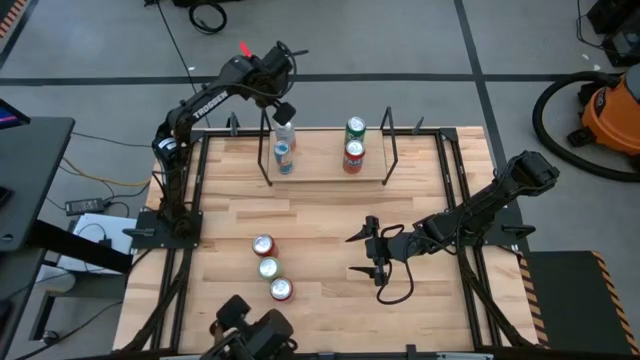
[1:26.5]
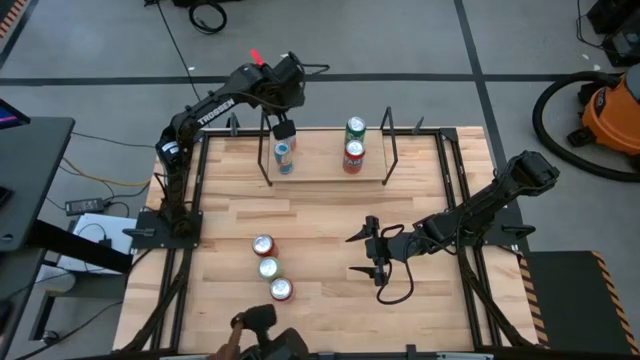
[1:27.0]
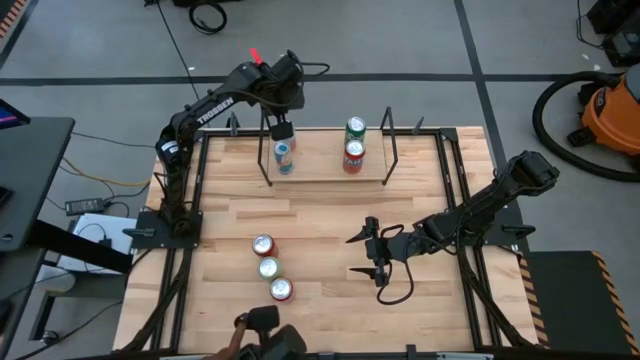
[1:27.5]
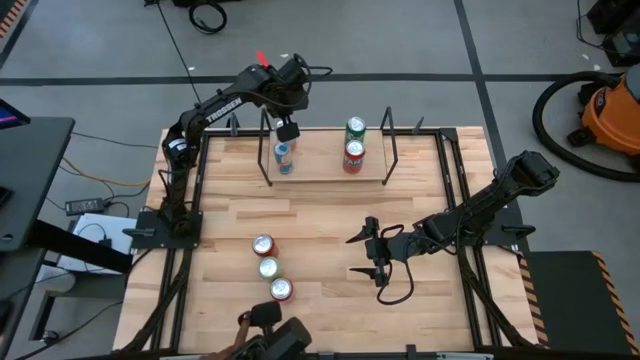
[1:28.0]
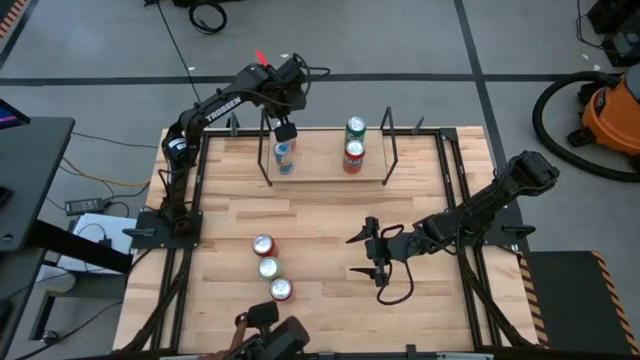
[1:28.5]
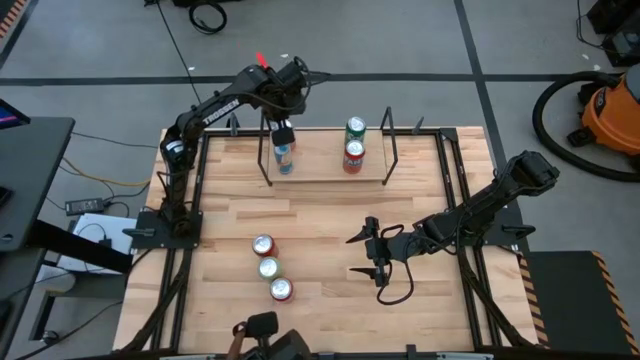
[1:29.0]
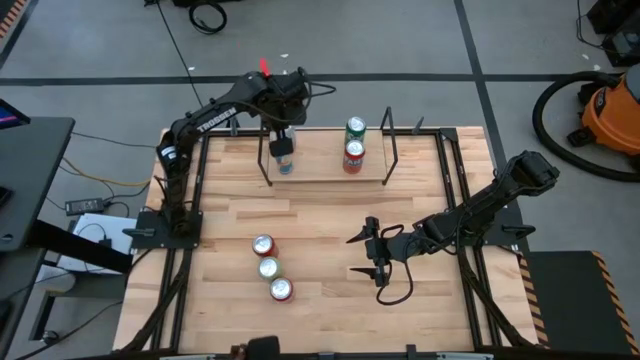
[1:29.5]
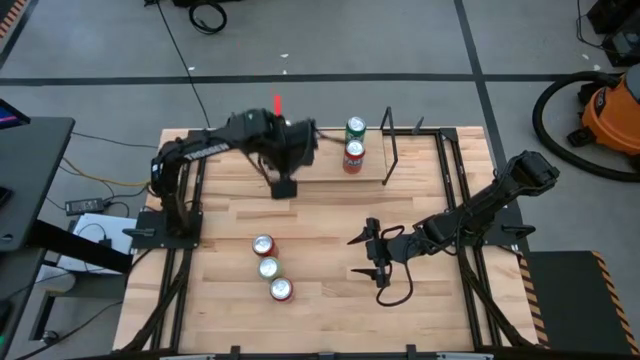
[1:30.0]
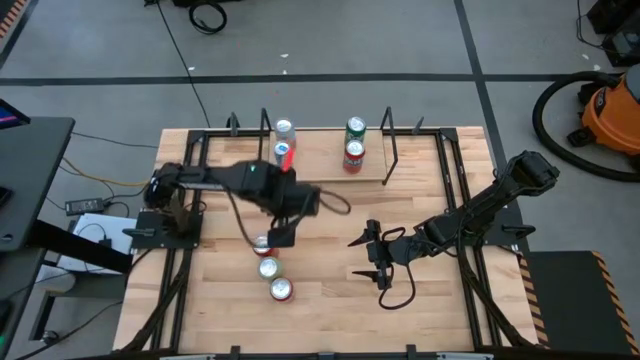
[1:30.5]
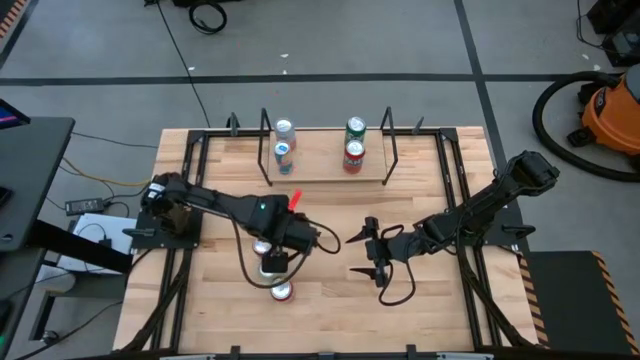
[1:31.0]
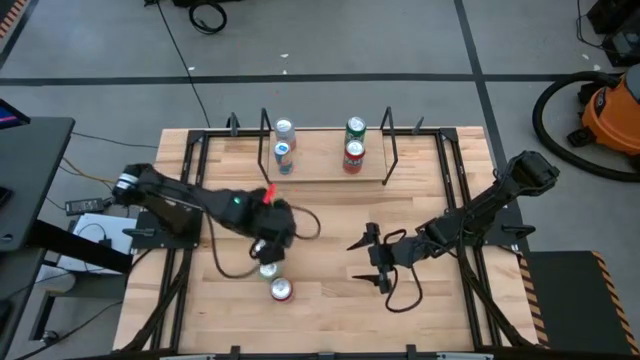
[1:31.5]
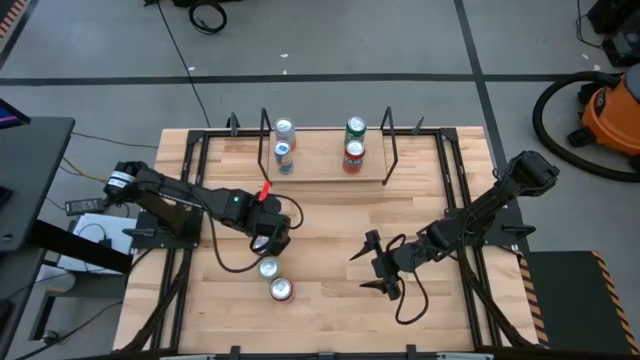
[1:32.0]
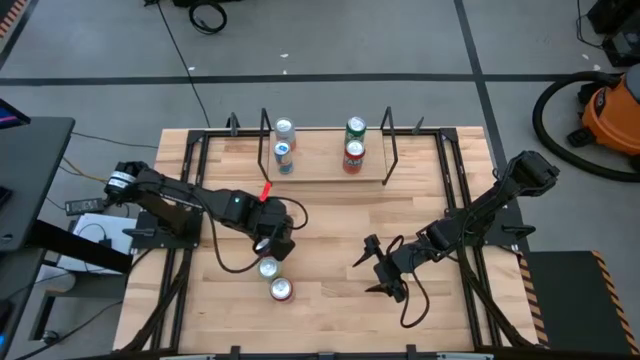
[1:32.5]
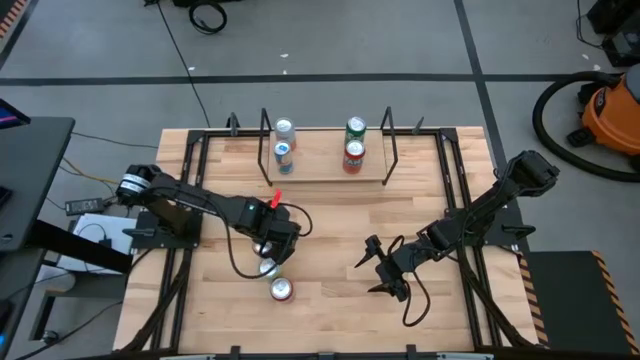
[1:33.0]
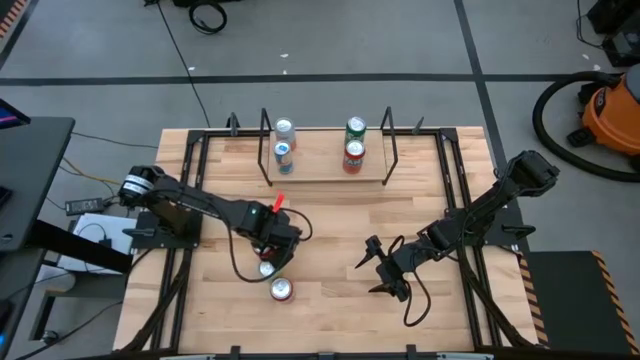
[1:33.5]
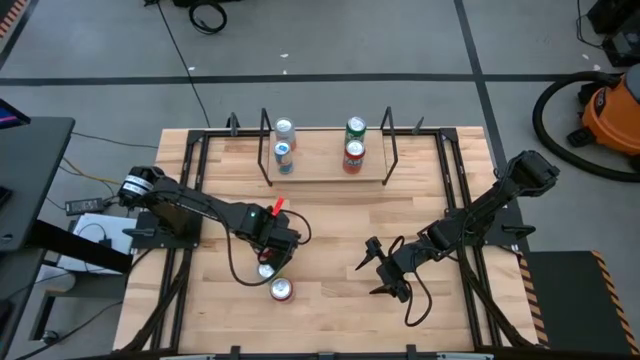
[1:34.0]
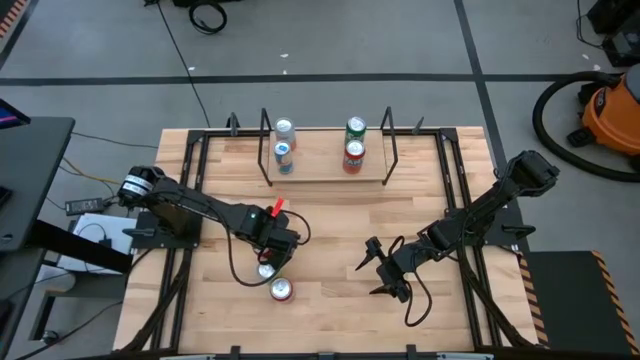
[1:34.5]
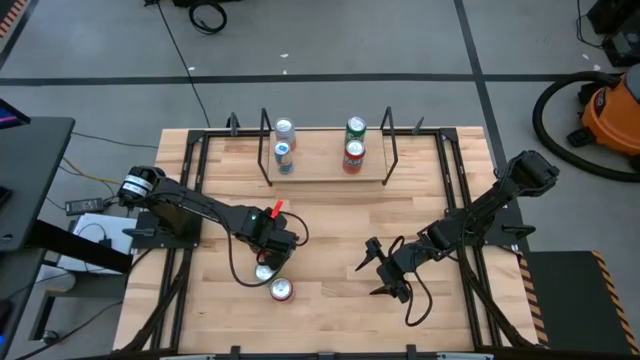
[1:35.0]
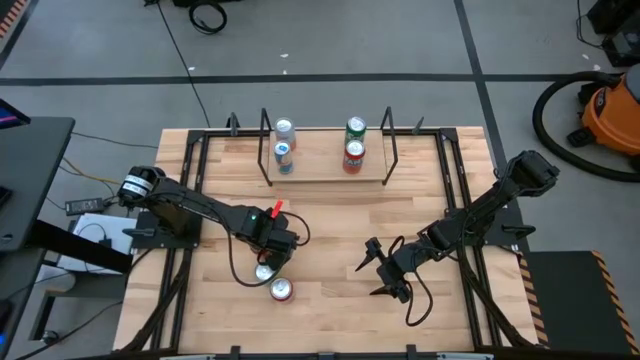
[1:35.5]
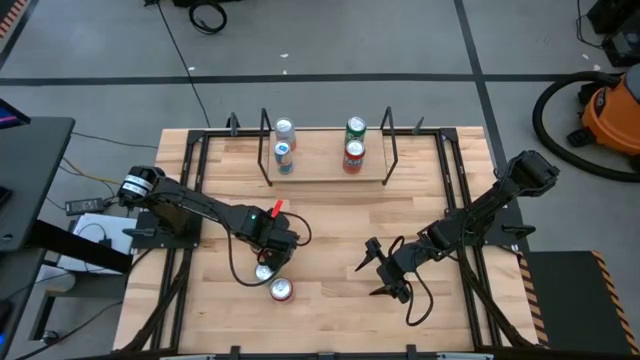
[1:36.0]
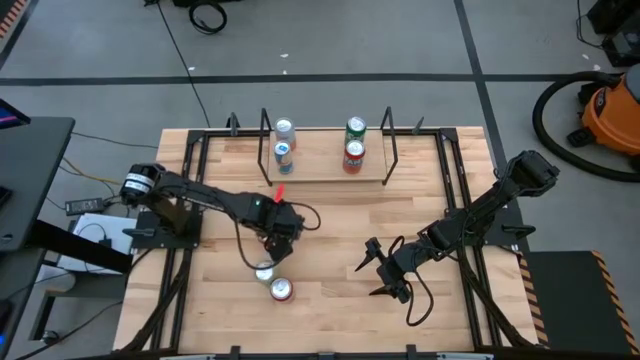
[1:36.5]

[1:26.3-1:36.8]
Task: Place canned beverage on shelf
Put the red-black soda can on the shelf
